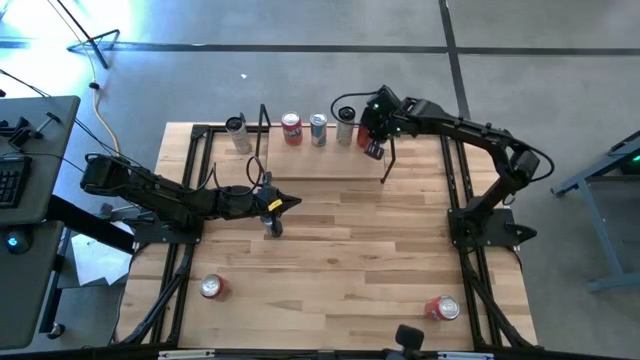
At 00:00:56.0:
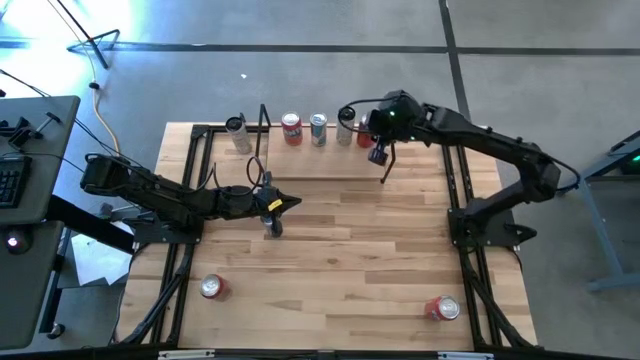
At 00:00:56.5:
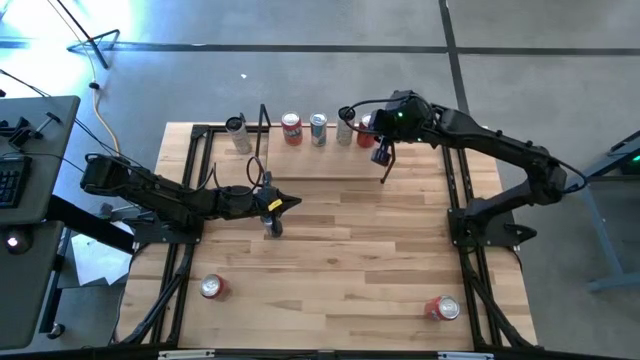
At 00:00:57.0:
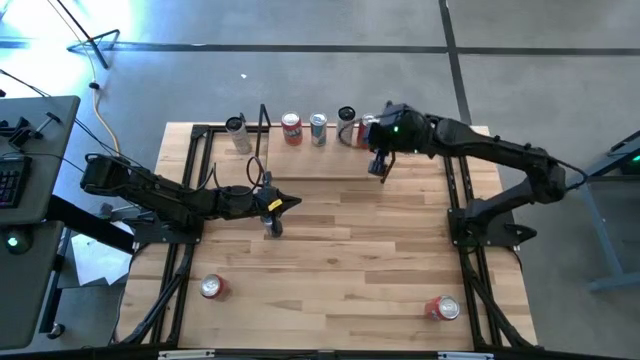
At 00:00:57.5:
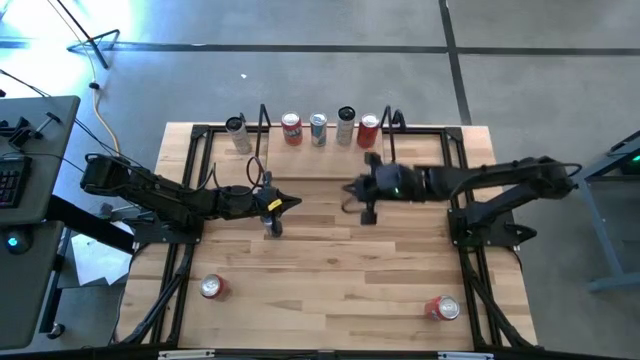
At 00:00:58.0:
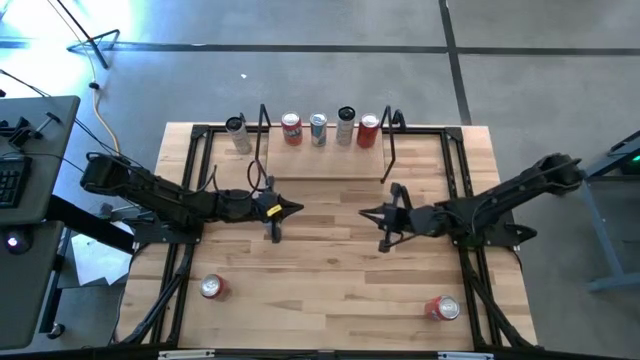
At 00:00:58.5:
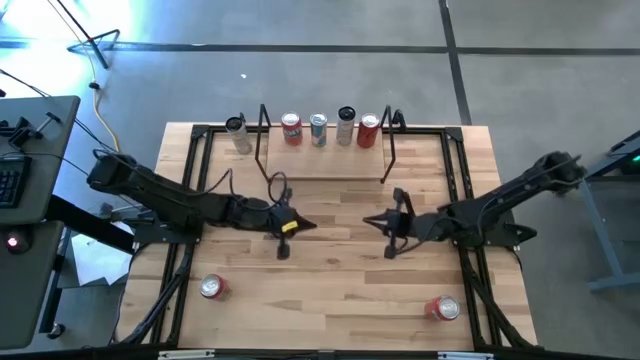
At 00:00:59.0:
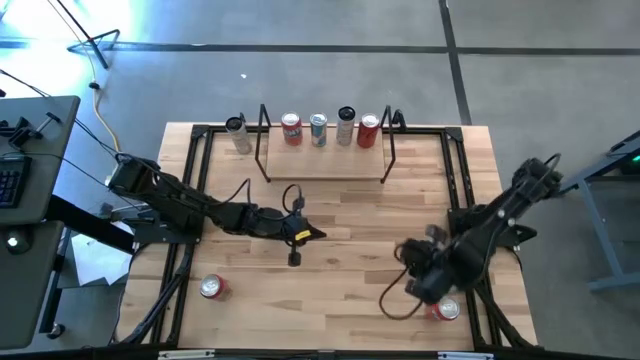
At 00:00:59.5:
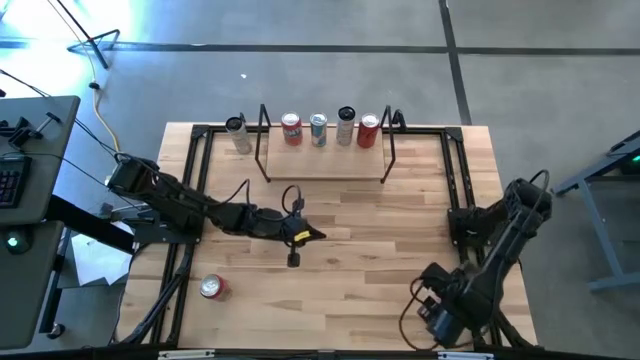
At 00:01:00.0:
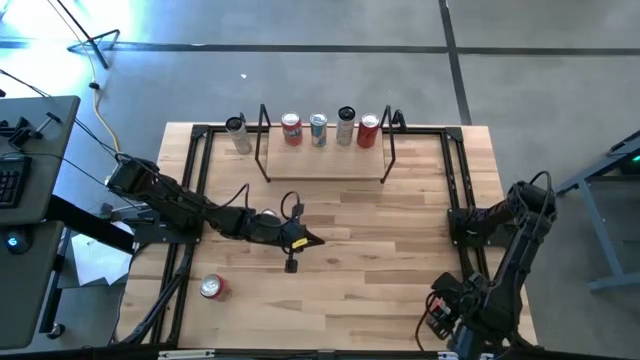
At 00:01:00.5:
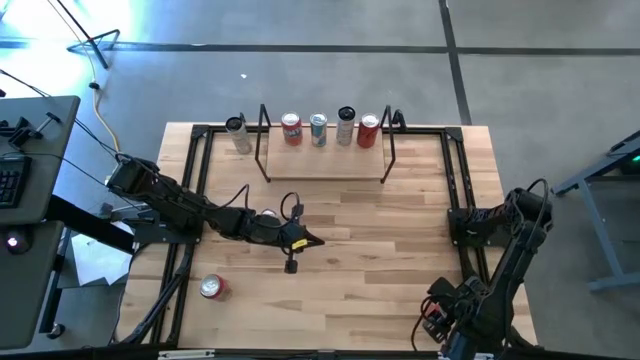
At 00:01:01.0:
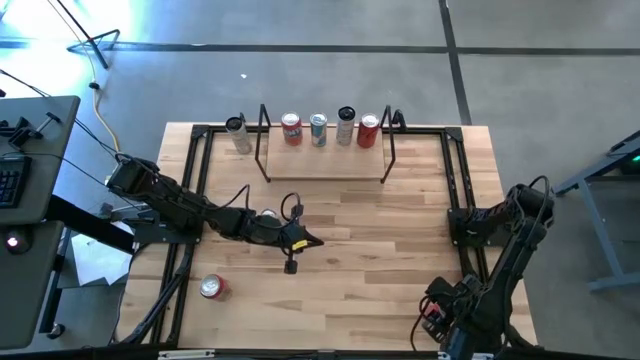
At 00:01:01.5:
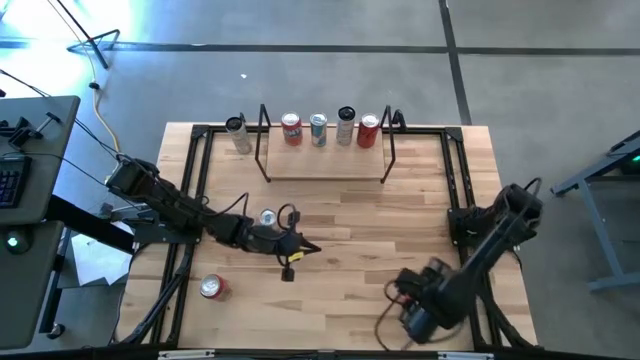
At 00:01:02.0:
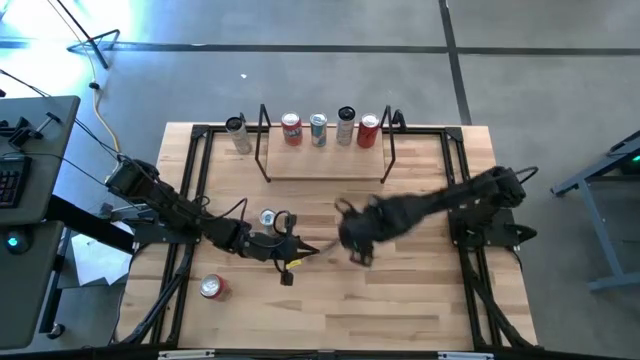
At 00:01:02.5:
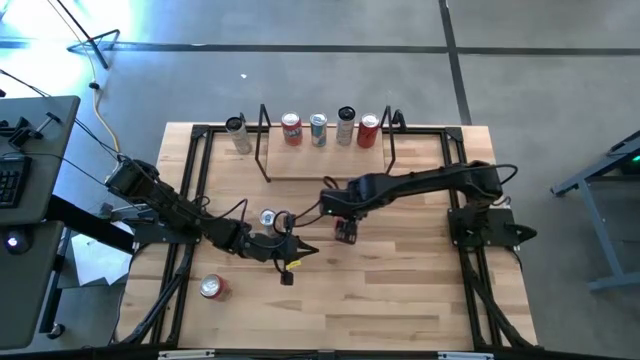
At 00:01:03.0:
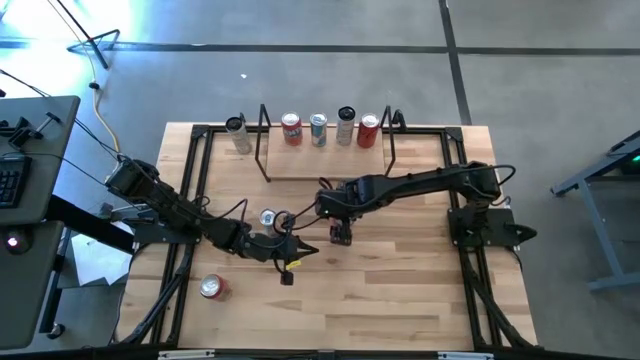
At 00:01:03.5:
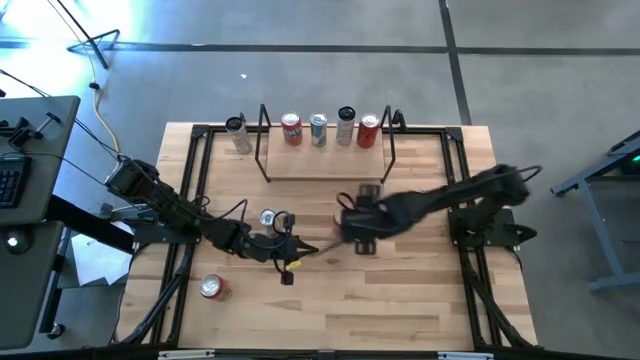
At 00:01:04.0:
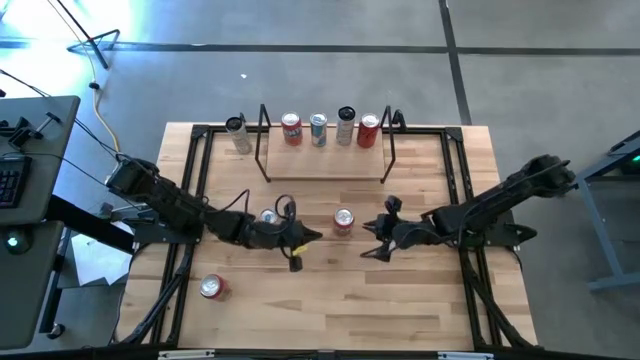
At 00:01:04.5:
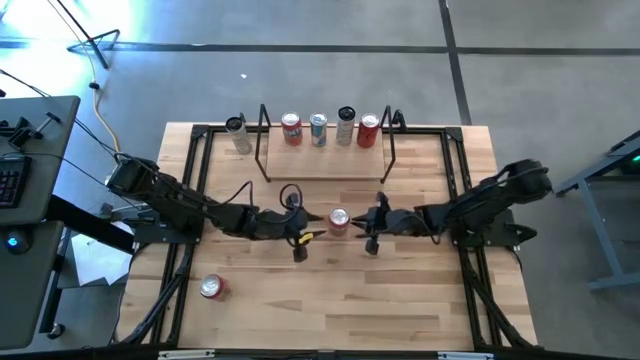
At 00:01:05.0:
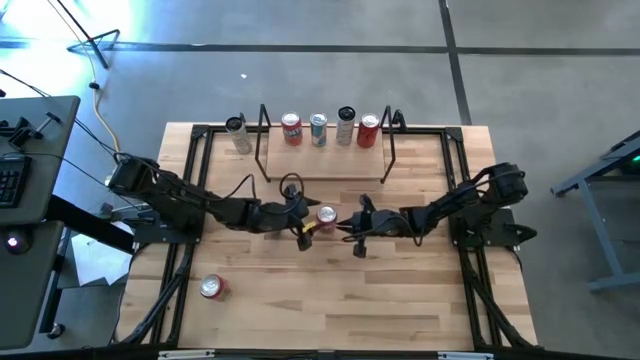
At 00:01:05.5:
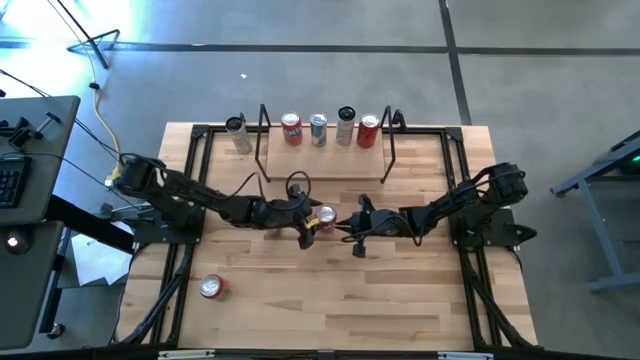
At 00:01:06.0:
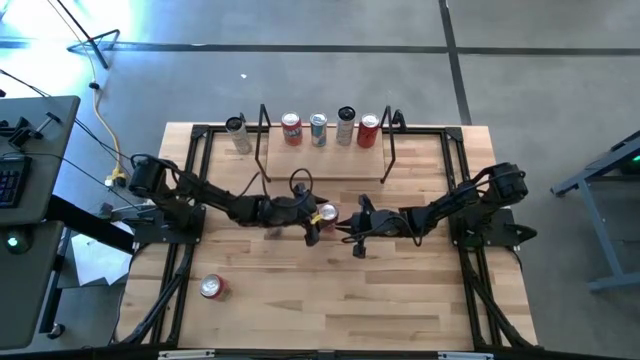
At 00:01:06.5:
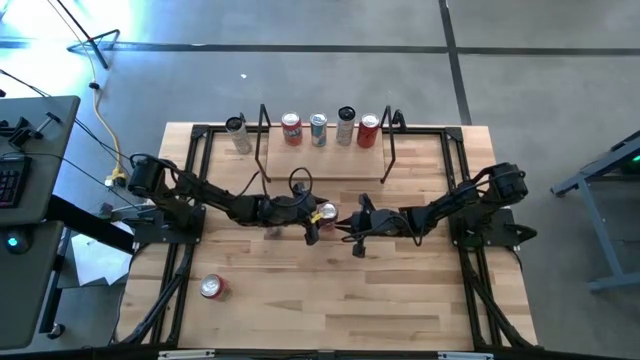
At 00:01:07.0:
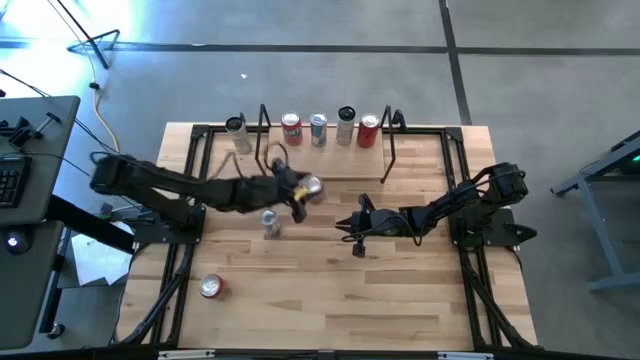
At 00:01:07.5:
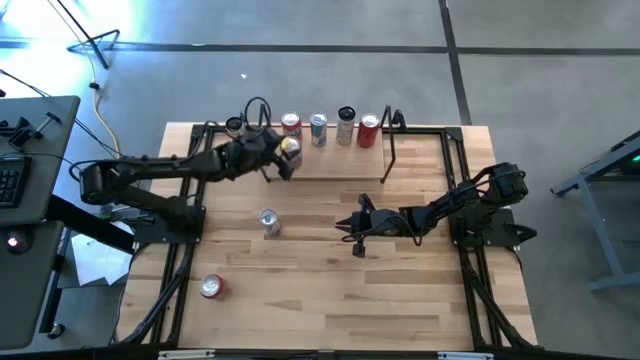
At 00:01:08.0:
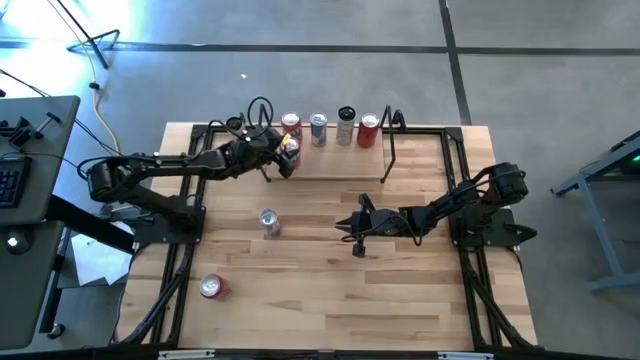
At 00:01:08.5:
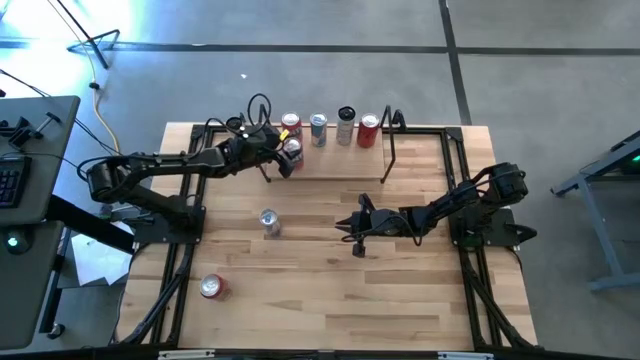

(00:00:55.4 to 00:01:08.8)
Task: Place canned beverage on shelf
Put the red soda can on the shelf aligned with the other red orange soda can

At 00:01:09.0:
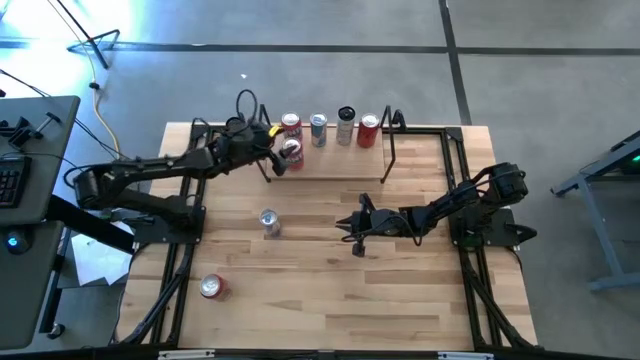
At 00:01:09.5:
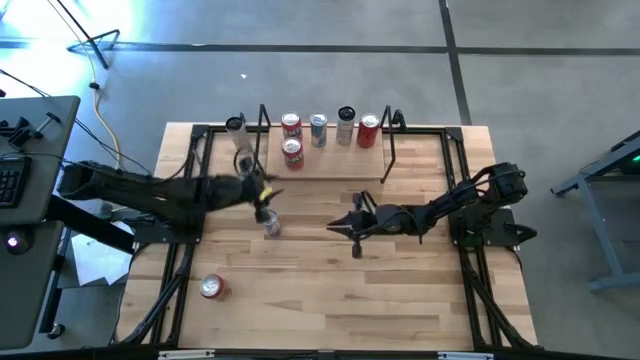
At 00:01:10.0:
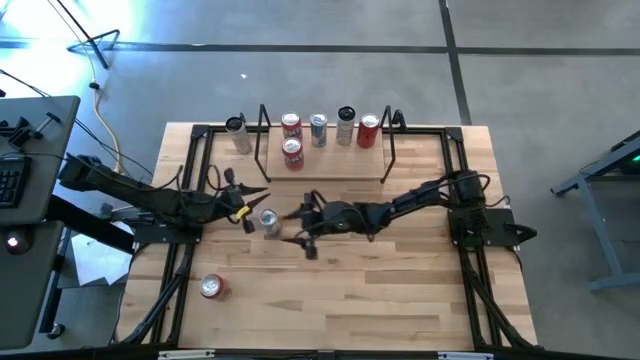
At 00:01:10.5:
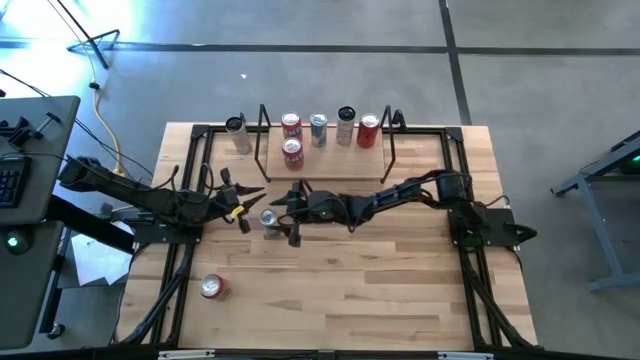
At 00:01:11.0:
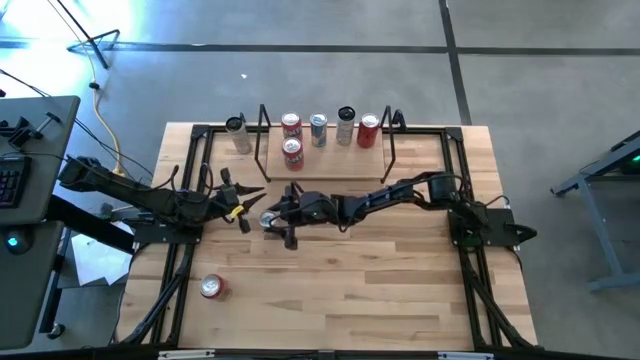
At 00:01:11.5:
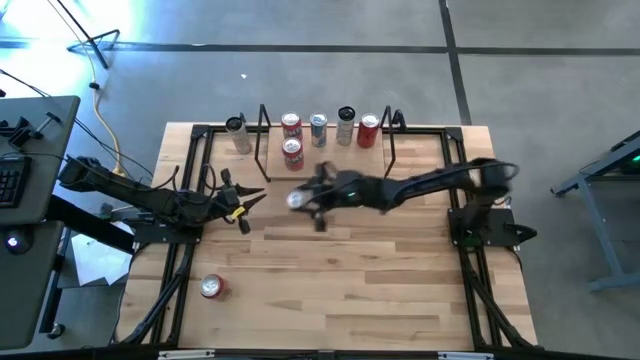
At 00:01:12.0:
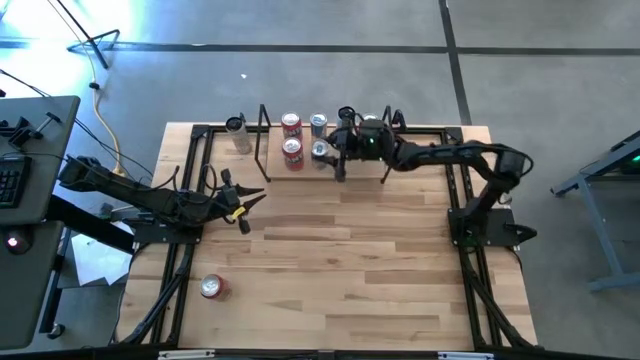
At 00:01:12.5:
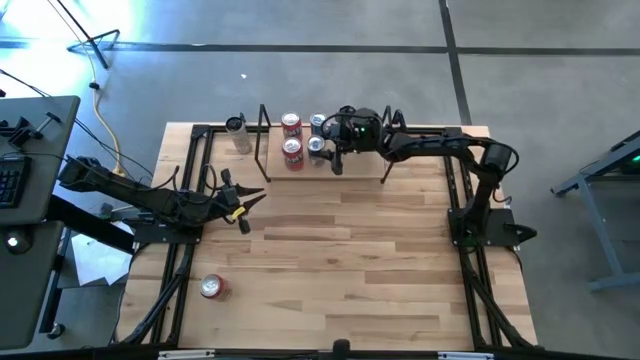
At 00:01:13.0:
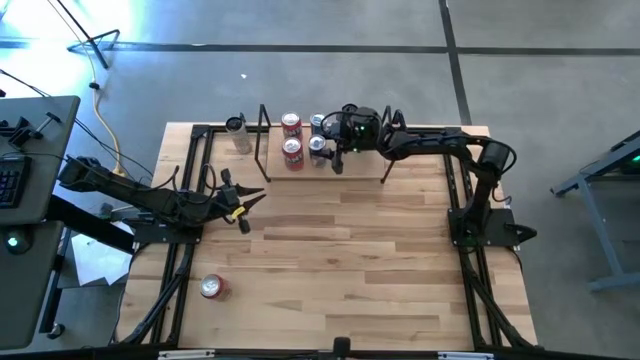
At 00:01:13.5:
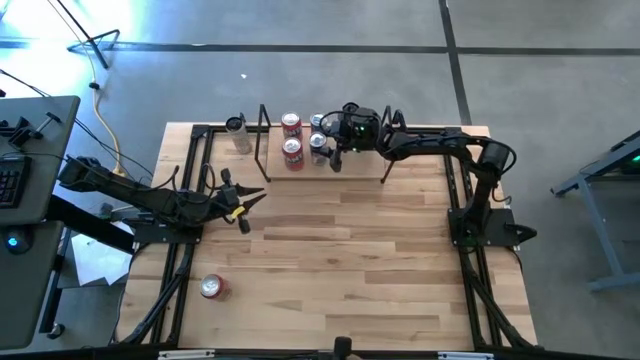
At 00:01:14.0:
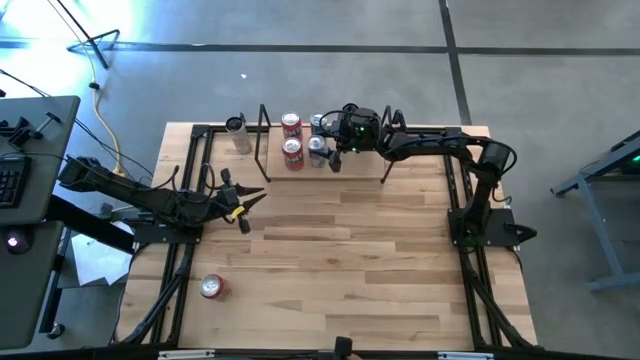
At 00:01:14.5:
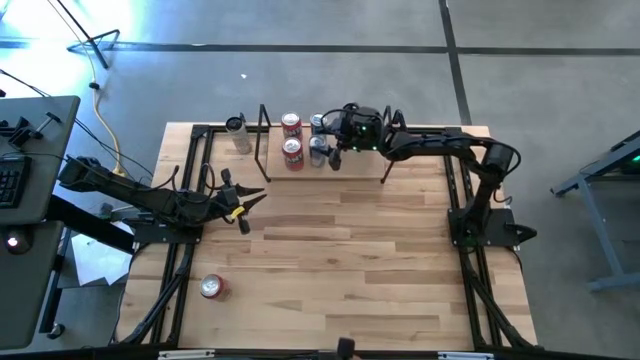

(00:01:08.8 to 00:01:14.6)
Put the blue soda can on the shelf aligned with the other blue soda can

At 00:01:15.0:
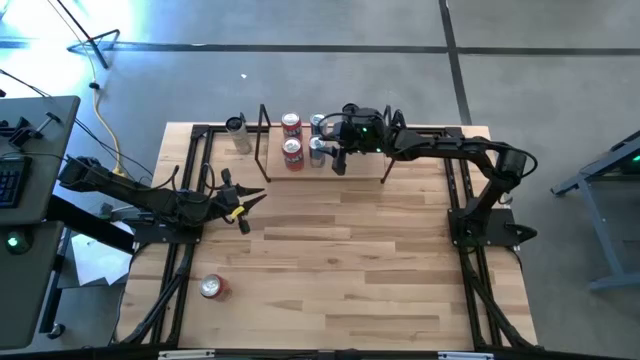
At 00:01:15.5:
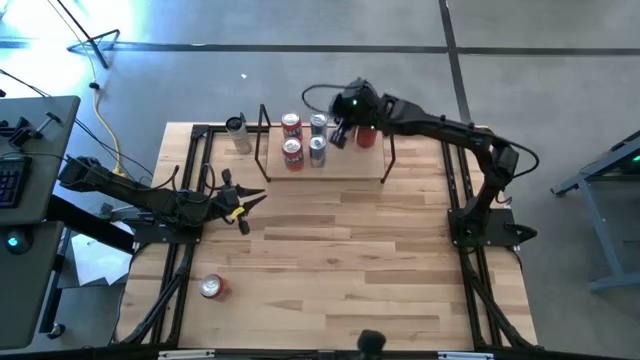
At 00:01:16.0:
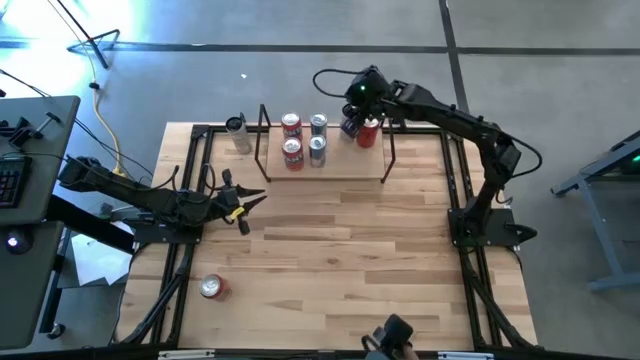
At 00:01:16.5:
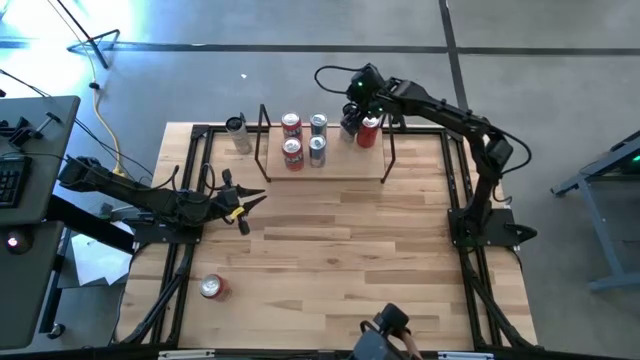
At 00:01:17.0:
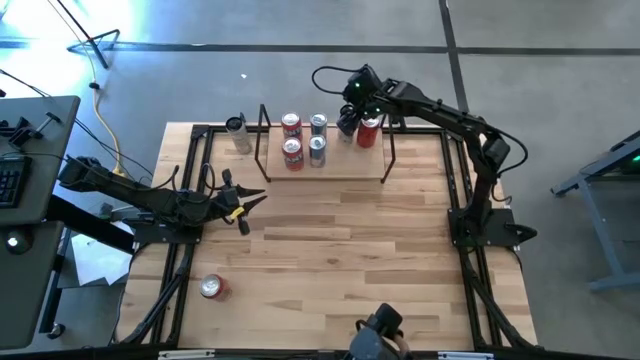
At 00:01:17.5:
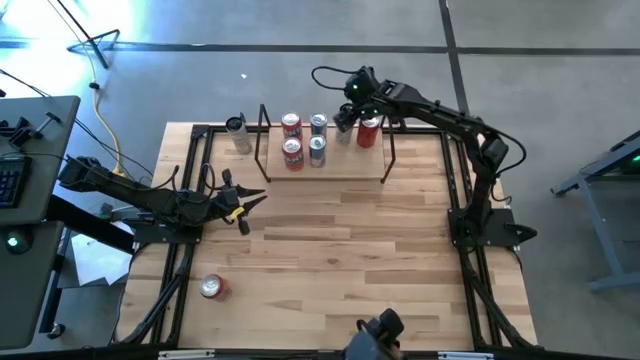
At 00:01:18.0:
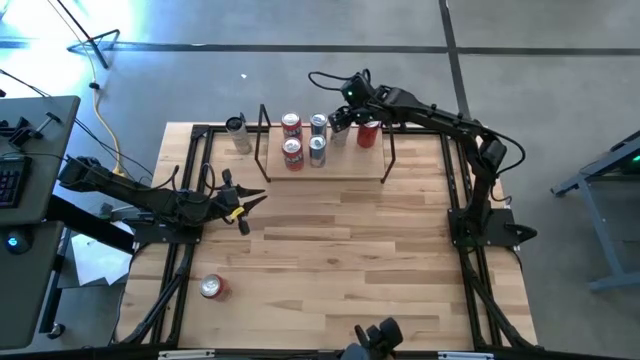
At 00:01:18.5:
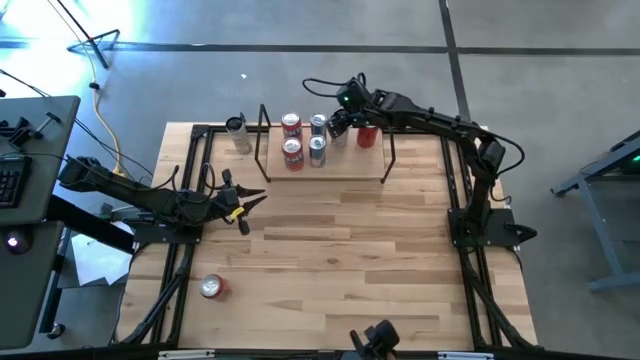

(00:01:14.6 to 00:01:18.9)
Adjust the white yellow soda can on the shelf
